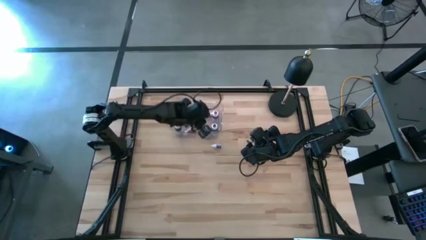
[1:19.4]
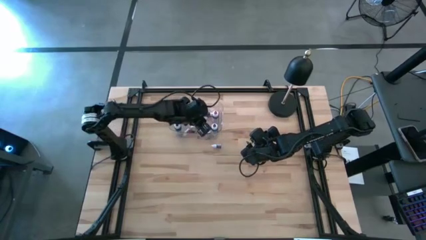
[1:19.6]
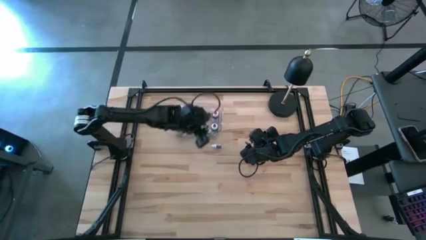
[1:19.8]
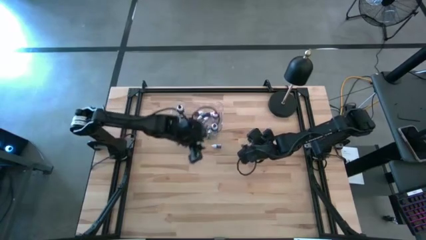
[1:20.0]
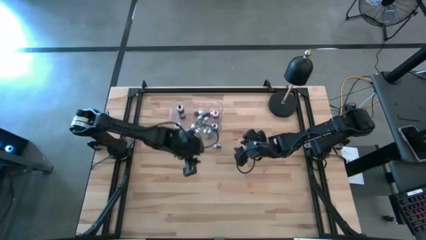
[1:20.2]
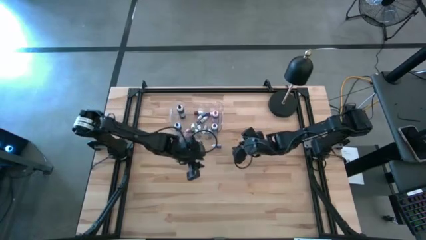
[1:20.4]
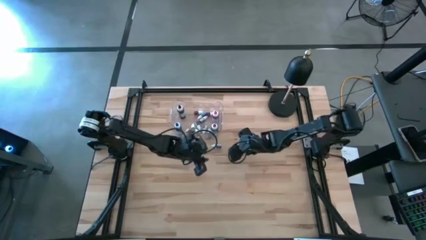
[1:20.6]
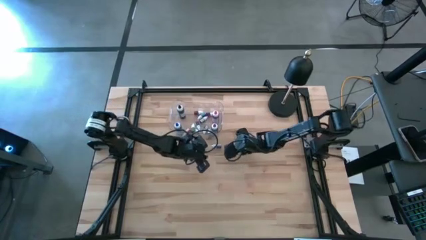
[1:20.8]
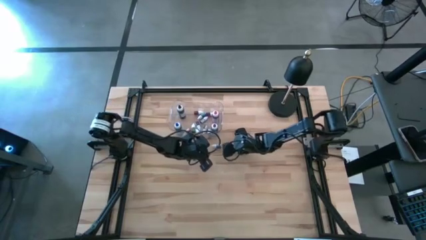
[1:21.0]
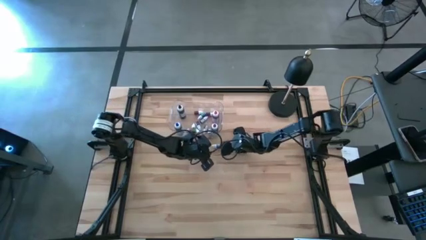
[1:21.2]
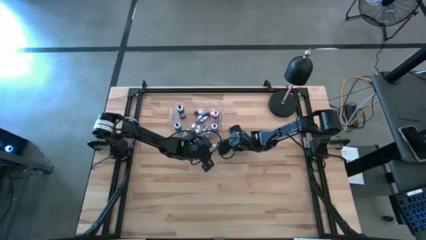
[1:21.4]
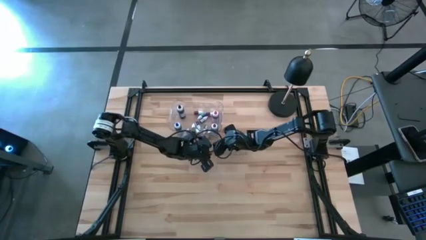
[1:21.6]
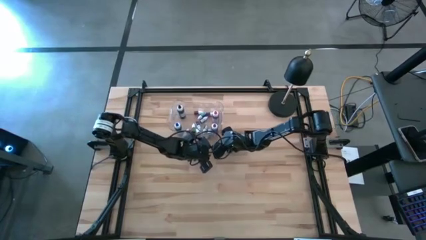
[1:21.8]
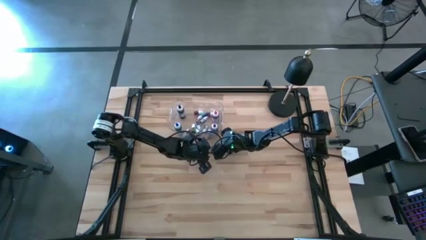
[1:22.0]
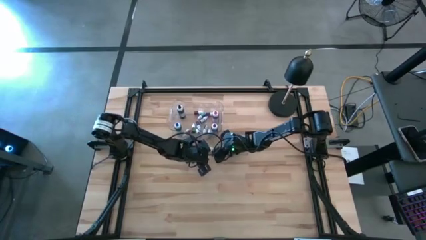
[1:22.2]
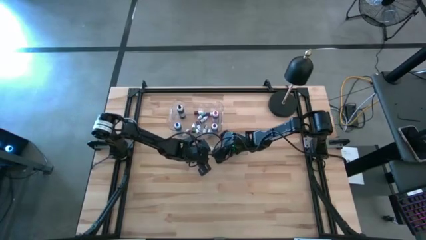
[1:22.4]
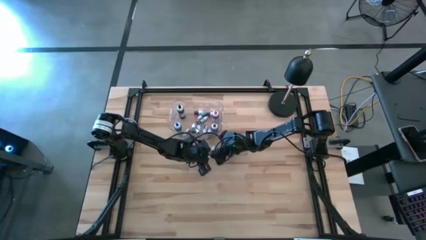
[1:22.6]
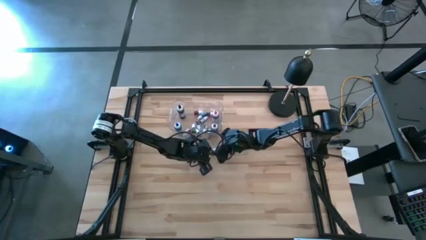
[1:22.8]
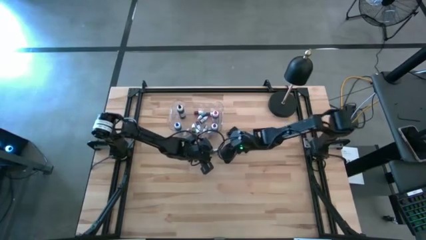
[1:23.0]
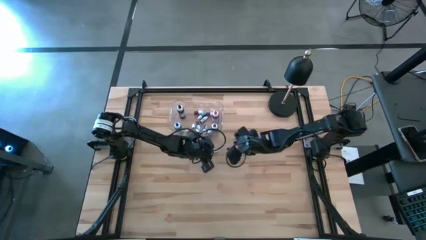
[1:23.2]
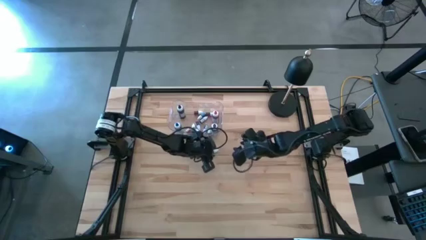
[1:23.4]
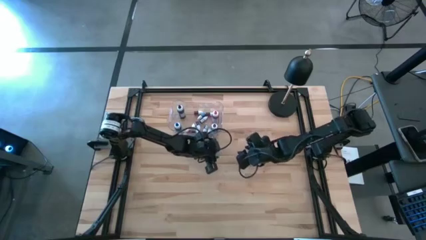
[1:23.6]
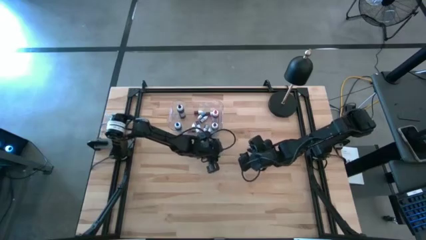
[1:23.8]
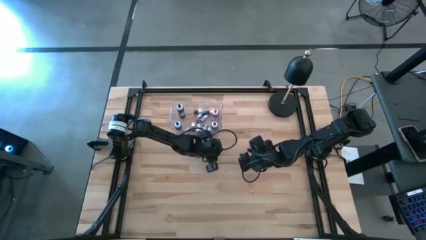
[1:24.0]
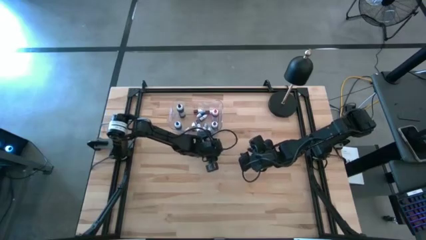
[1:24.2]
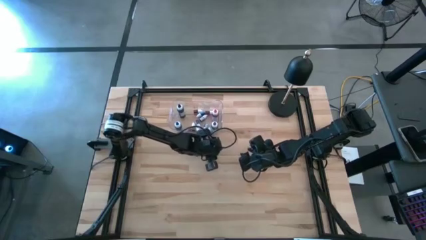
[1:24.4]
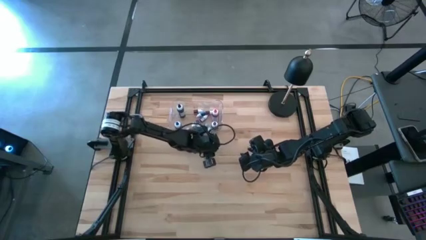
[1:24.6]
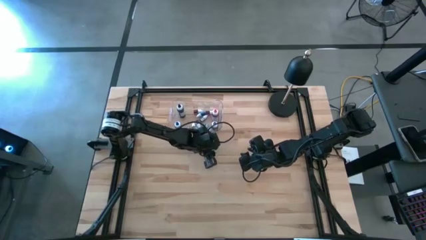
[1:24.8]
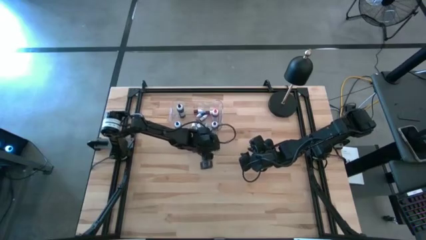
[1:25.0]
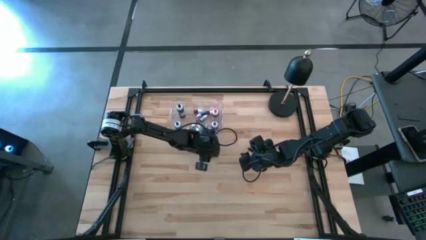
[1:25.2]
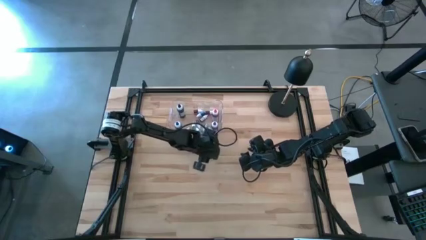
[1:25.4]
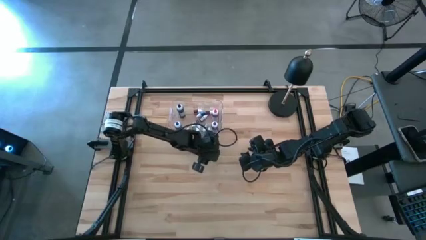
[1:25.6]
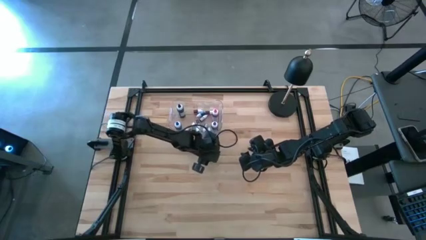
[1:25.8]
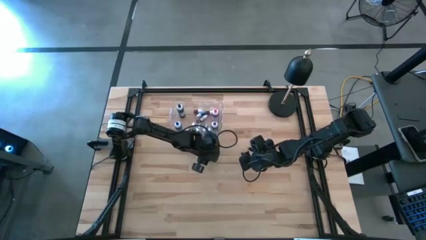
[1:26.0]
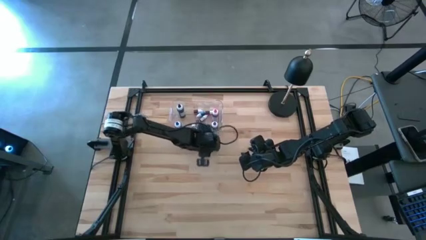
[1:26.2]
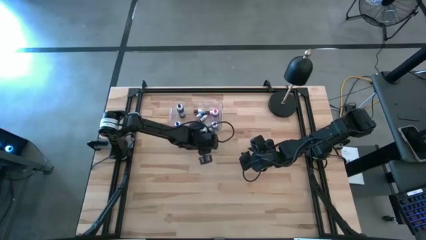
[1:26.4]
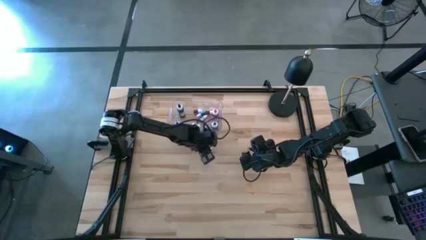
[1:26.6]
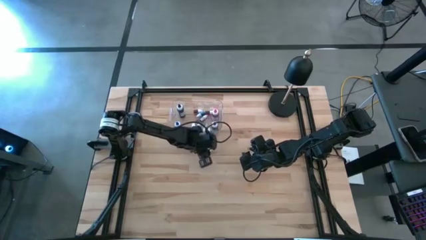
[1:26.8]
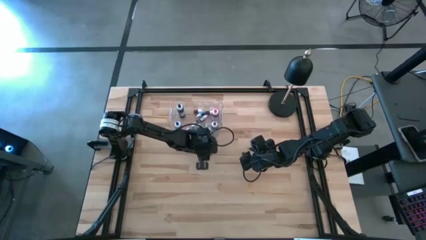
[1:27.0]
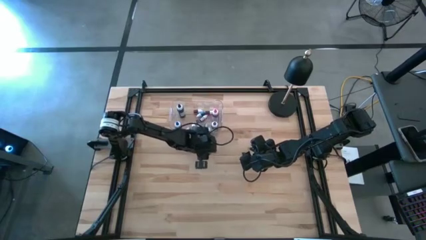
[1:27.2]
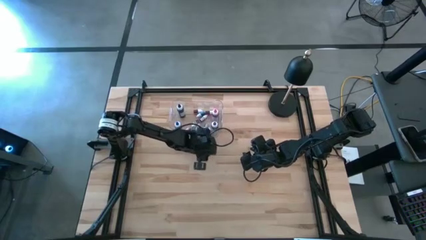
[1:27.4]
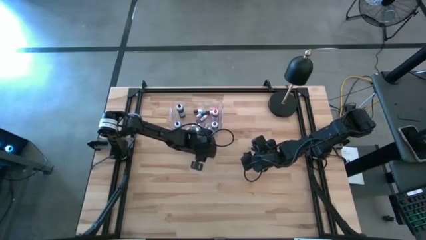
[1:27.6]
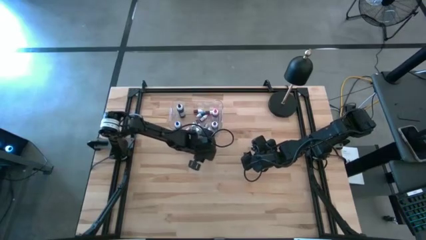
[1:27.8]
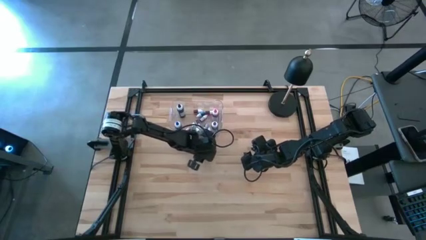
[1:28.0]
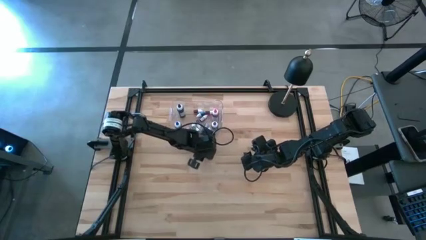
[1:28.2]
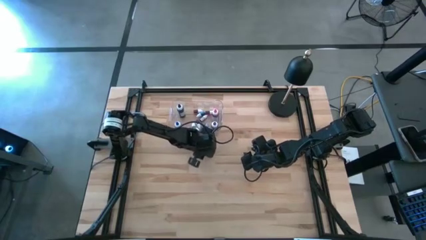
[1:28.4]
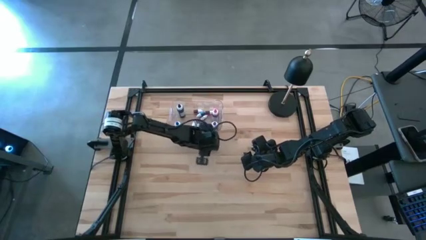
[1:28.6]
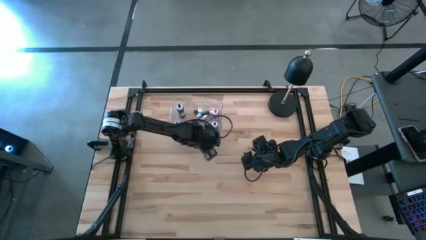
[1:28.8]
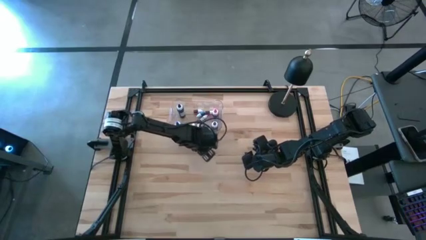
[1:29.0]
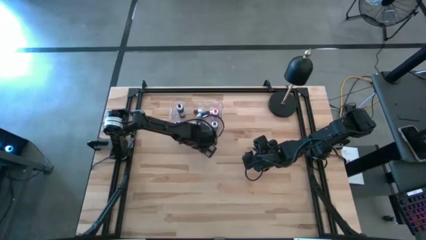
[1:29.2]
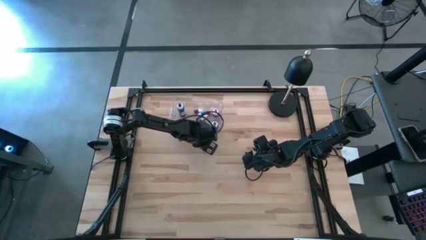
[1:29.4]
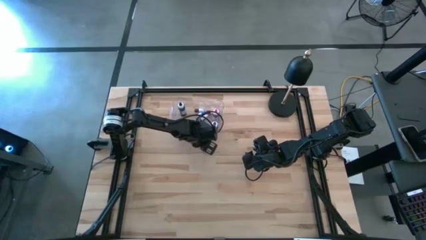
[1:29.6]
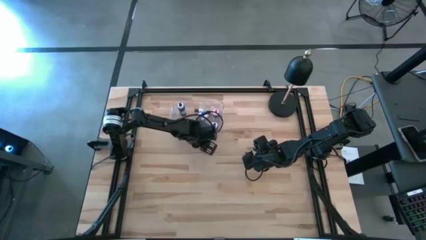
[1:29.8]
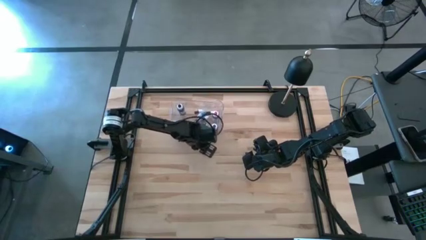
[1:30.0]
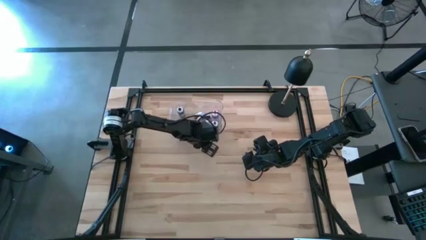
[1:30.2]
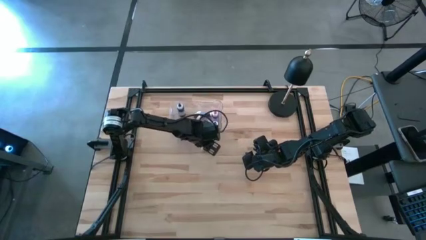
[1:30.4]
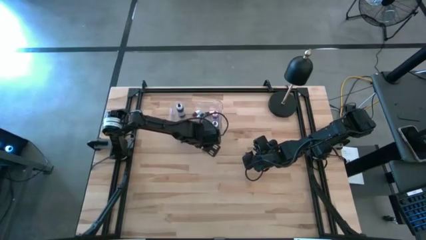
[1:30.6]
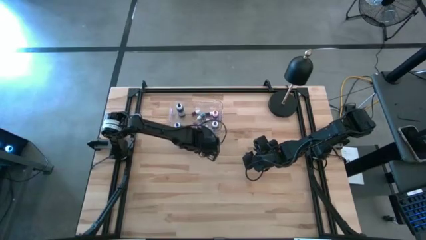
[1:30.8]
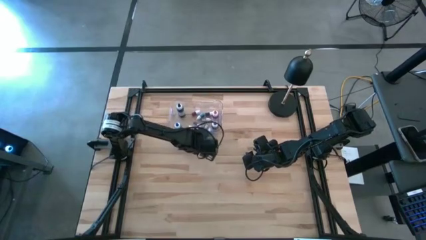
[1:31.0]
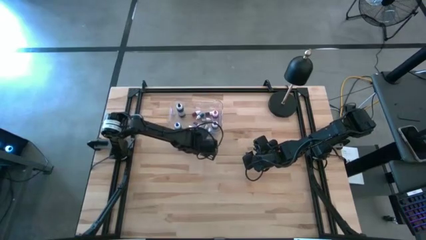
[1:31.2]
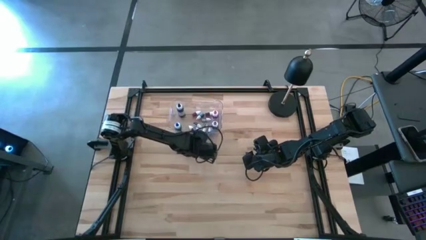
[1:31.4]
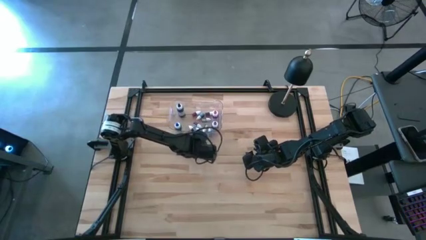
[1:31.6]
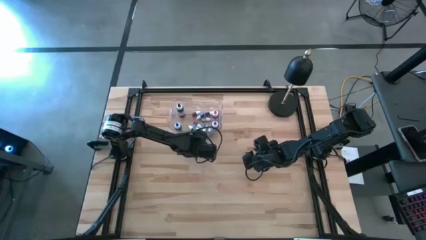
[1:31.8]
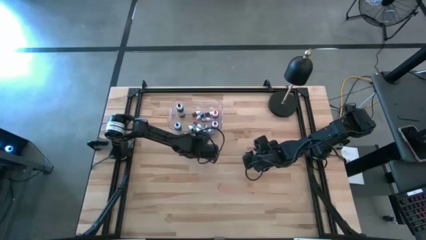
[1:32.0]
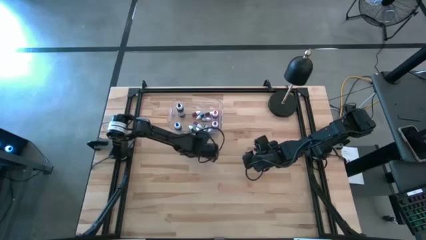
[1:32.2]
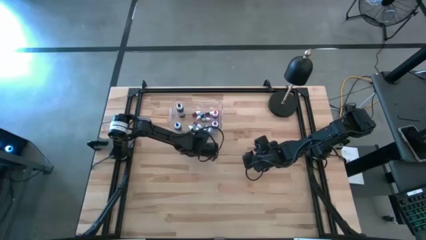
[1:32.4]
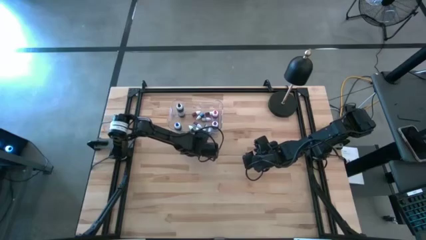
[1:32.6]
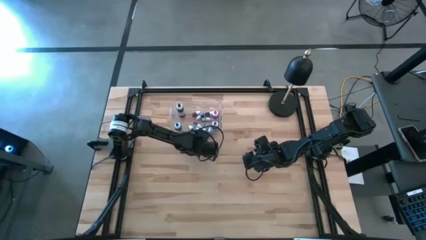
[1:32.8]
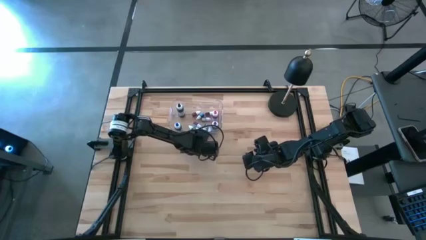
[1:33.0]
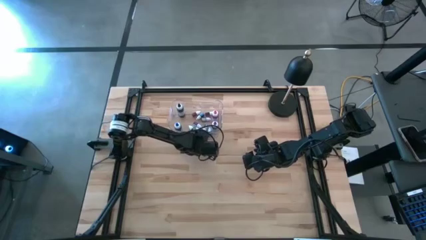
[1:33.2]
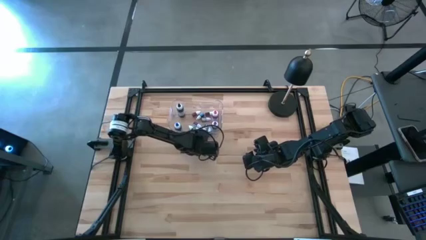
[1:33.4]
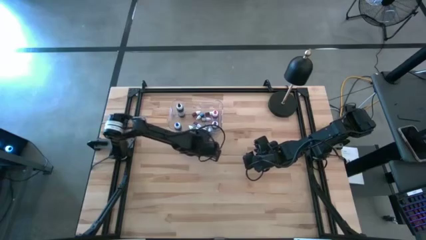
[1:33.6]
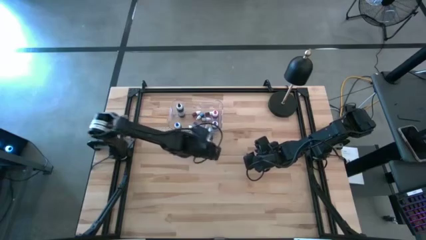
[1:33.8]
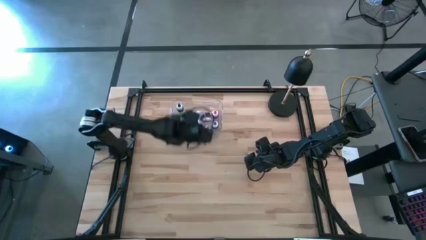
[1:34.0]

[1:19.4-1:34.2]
Task: Pick & Place food coloring
Put the small violet food coloring bottle into the transparent bin
